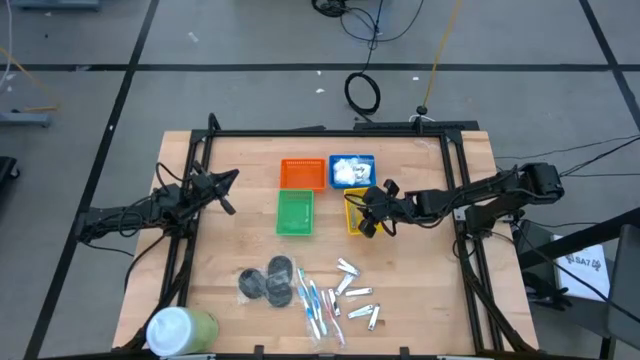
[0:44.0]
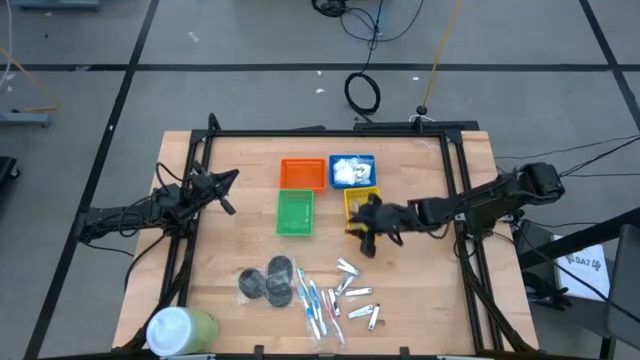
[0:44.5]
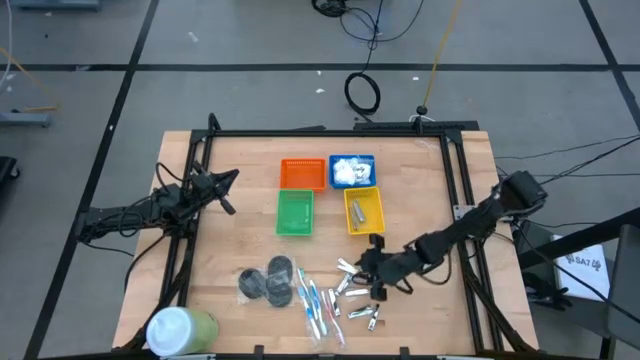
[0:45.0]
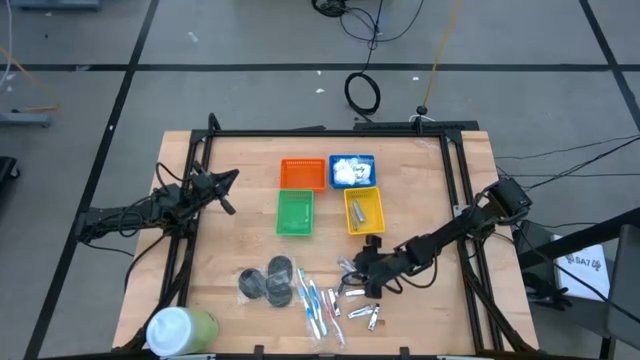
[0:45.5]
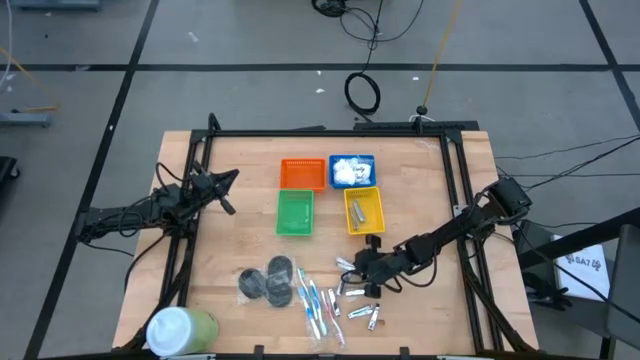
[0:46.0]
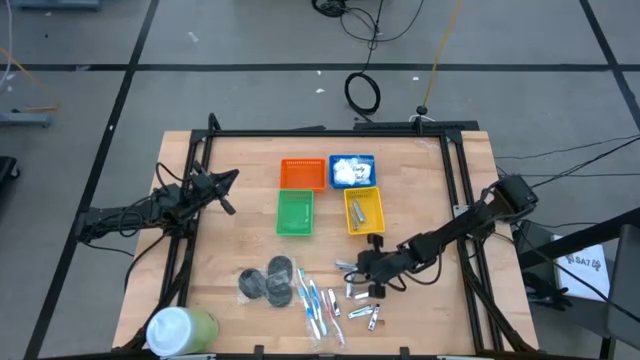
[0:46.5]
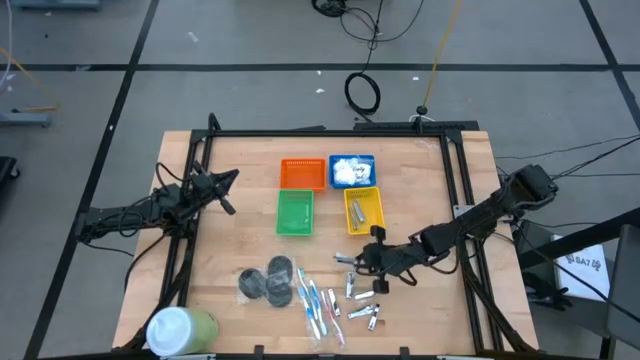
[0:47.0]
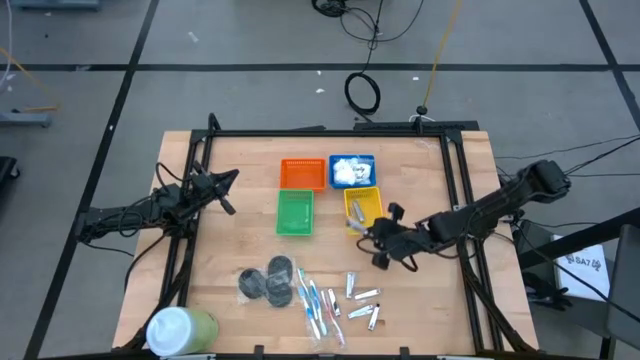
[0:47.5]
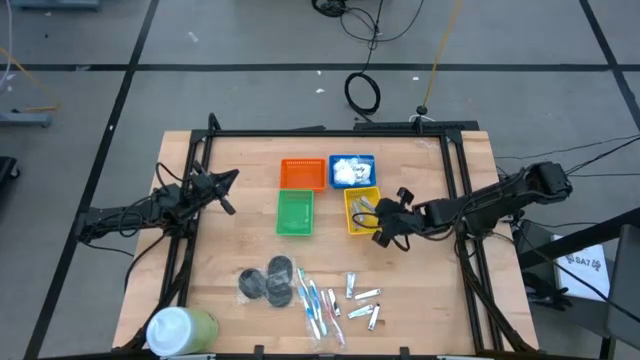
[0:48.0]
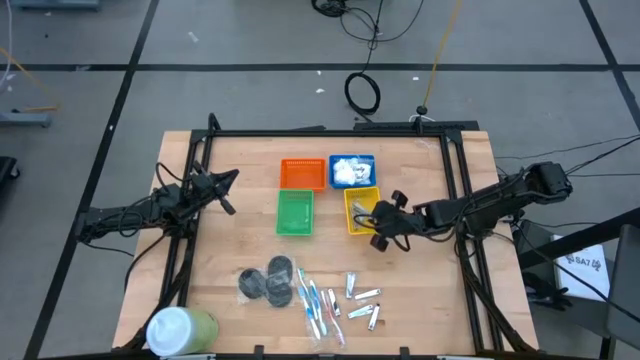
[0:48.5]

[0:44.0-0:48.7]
Task: Pick & Place Travel size toiletries
Put the silver nail cutter into the yellow bin

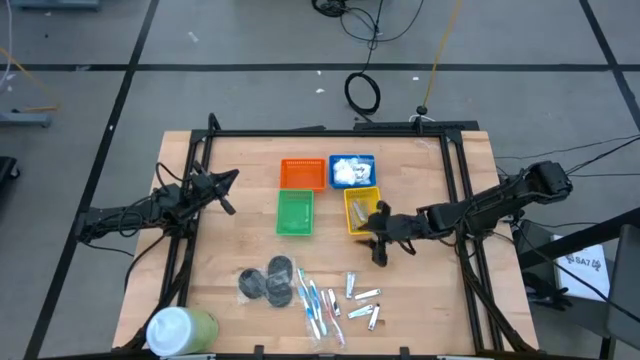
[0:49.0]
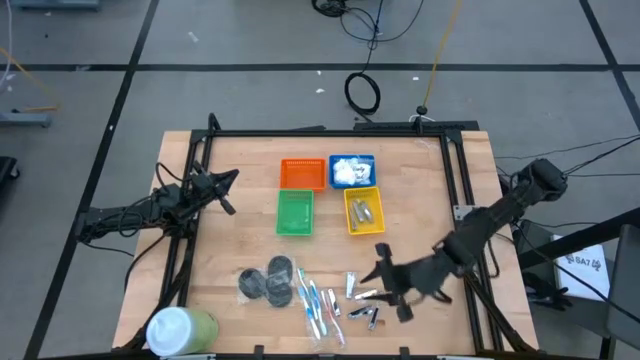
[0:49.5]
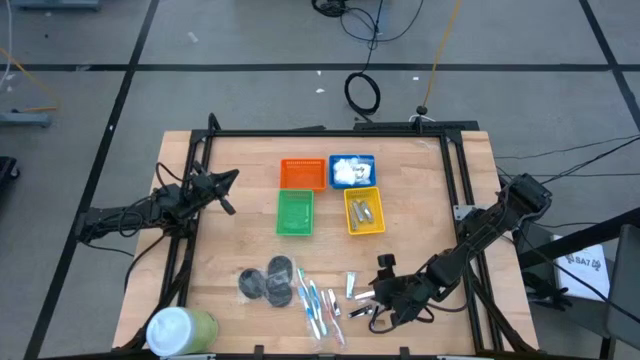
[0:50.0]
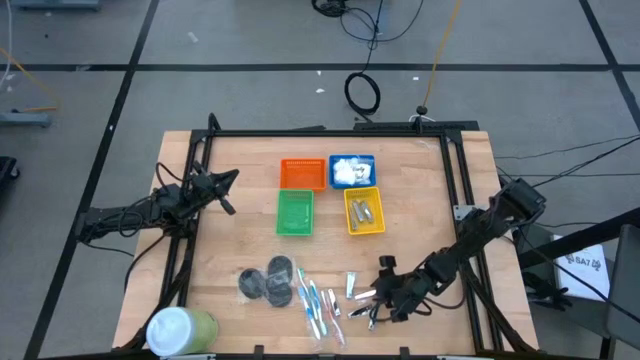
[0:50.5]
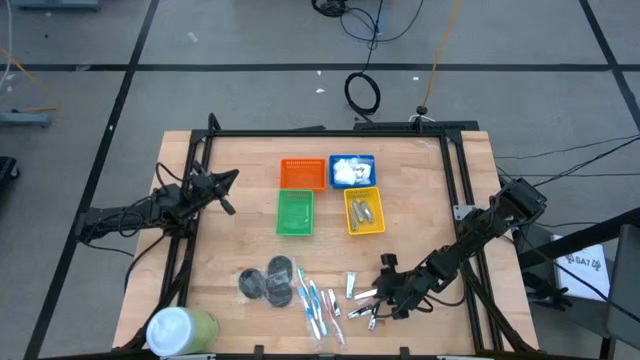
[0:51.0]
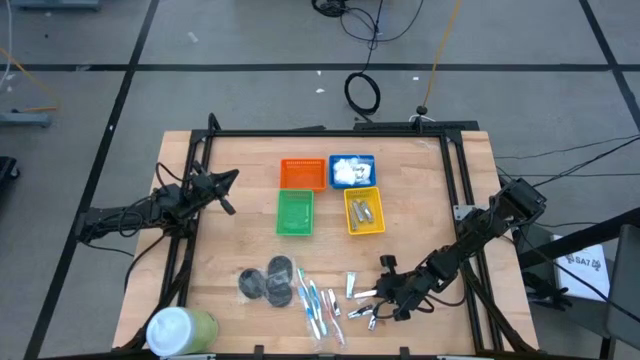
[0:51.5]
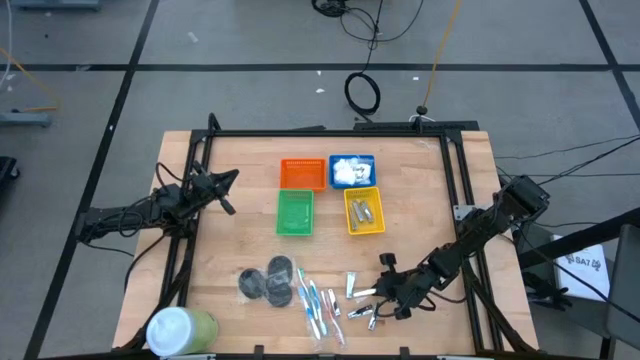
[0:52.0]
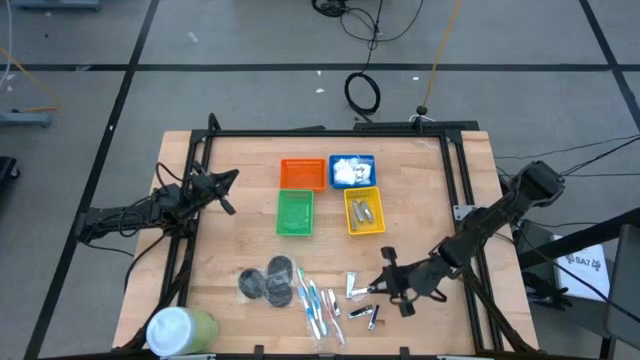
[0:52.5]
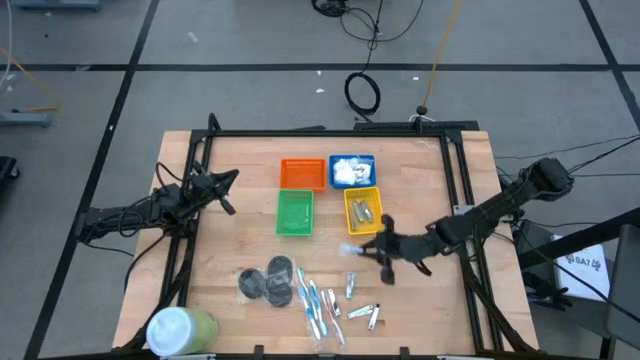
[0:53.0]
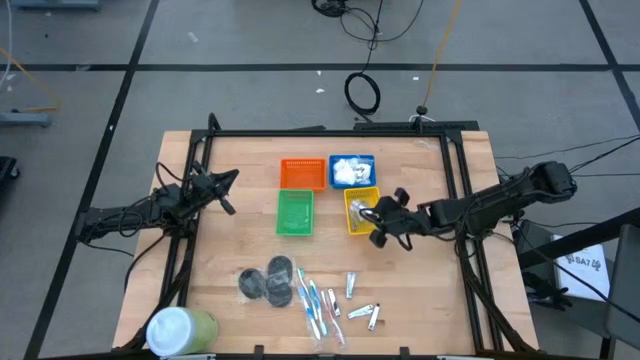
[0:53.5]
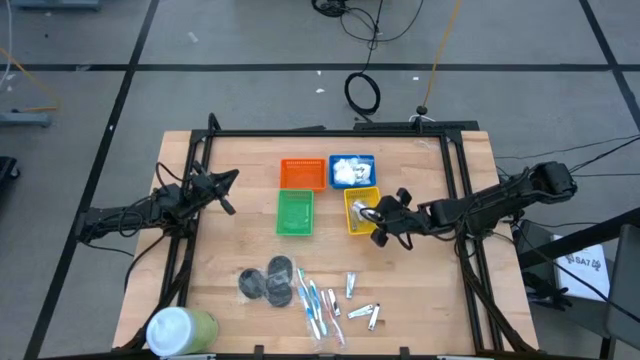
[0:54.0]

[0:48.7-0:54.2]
Put the silver nail cutter into the yellow bin

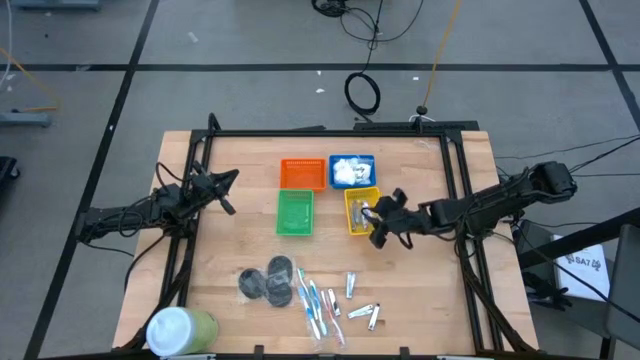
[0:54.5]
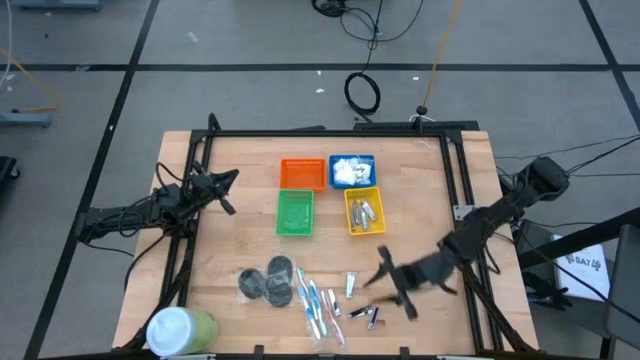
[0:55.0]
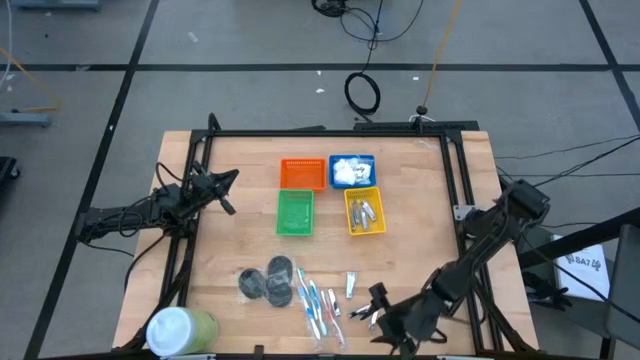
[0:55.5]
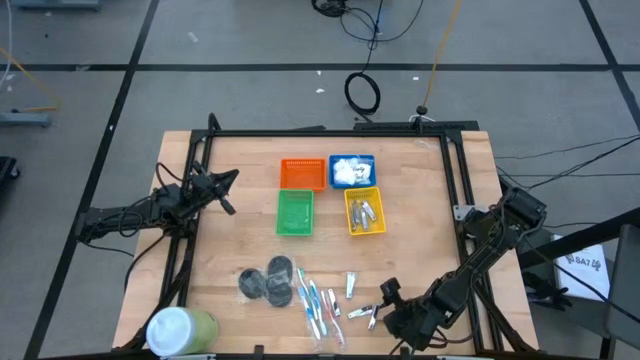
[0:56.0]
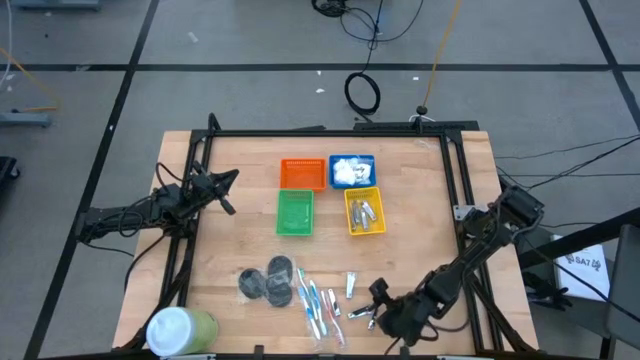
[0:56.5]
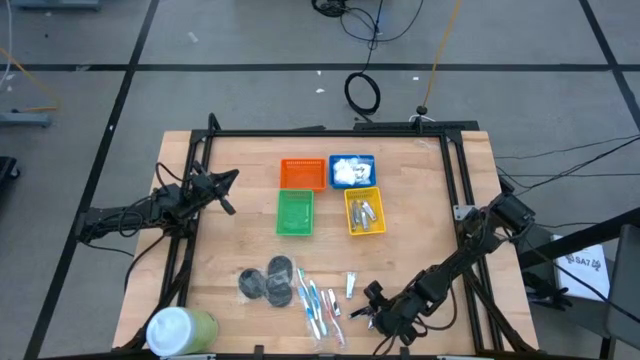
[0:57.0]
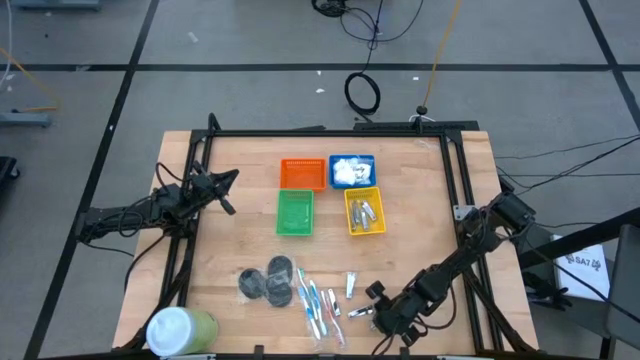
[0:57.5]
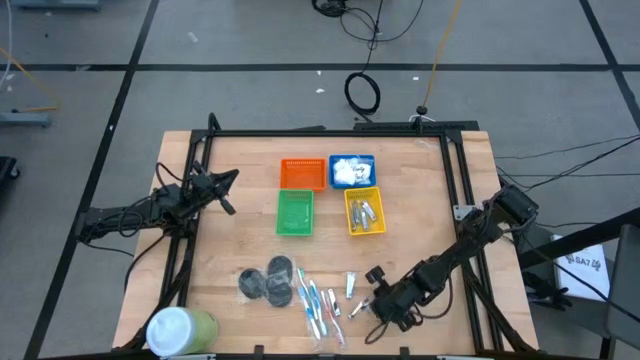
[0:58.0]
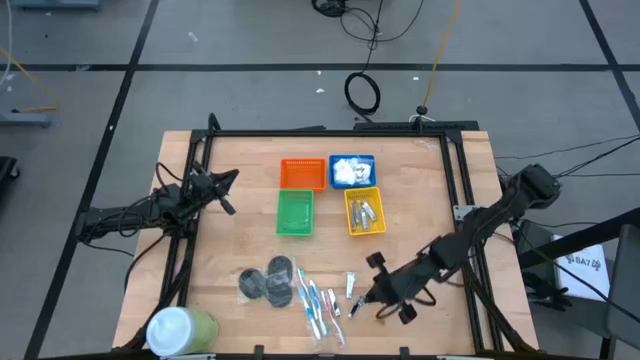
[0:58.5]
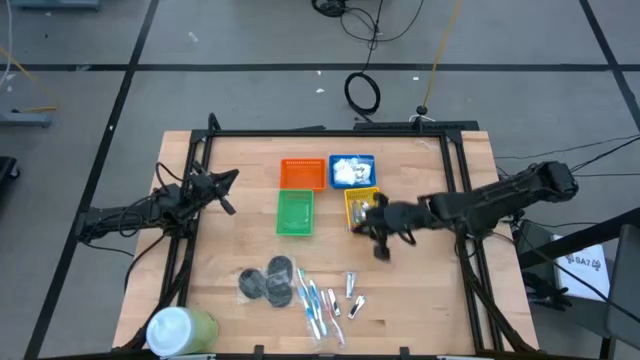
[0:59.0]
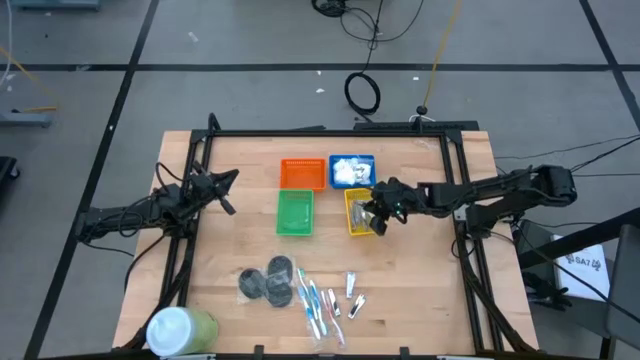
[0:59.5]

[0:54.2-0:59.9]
Put the silver nail cutter into the yellow bin

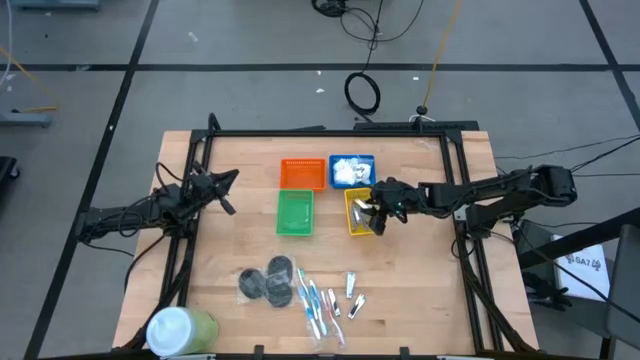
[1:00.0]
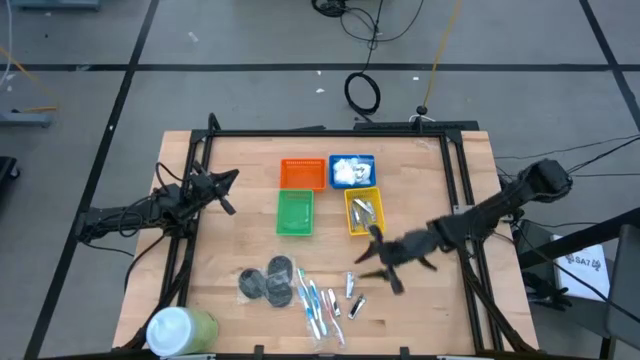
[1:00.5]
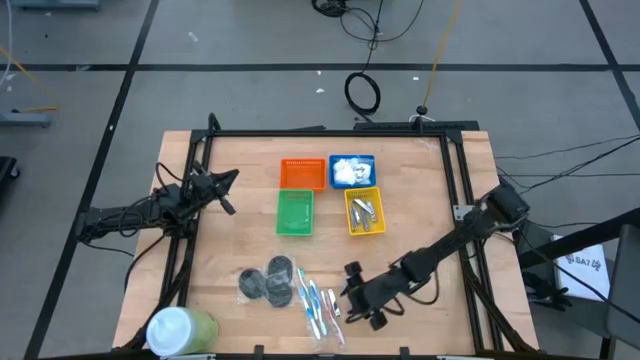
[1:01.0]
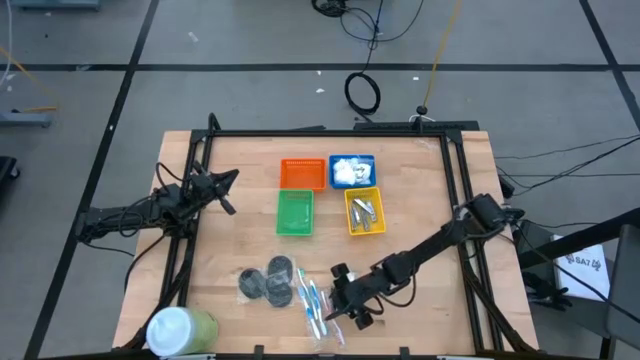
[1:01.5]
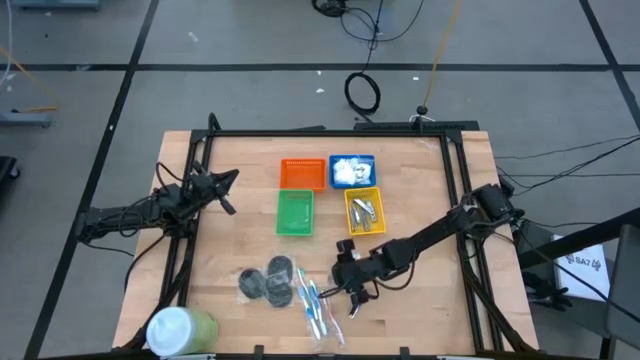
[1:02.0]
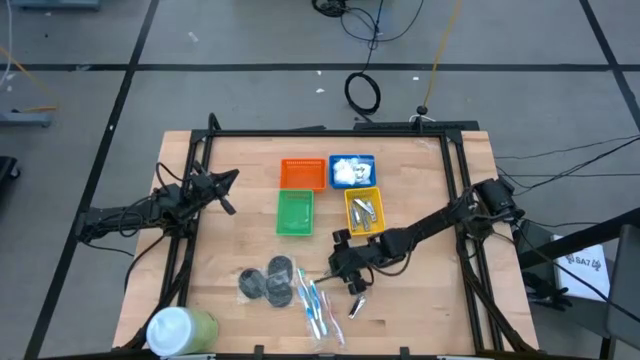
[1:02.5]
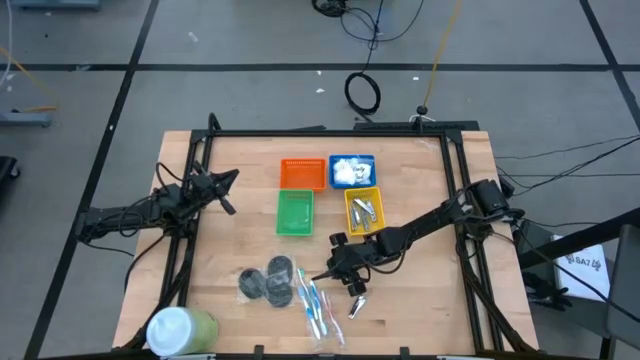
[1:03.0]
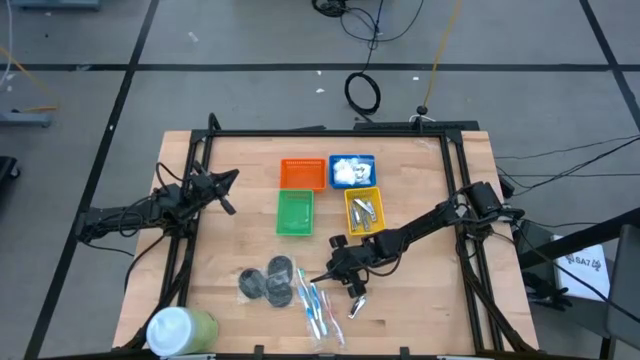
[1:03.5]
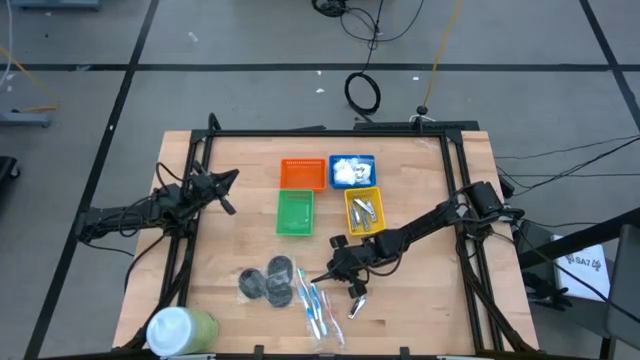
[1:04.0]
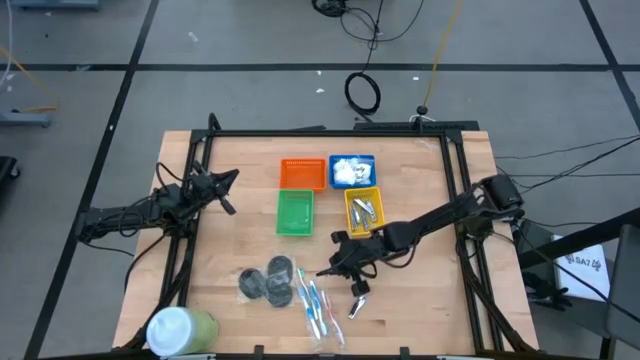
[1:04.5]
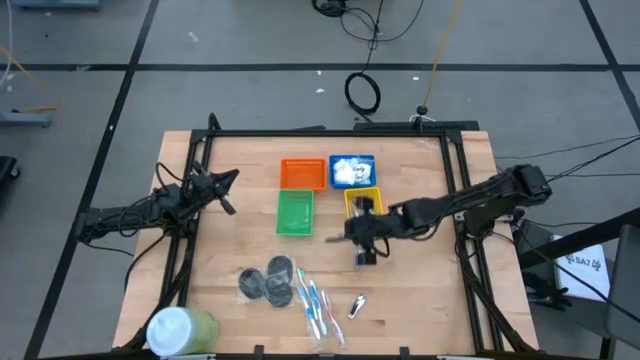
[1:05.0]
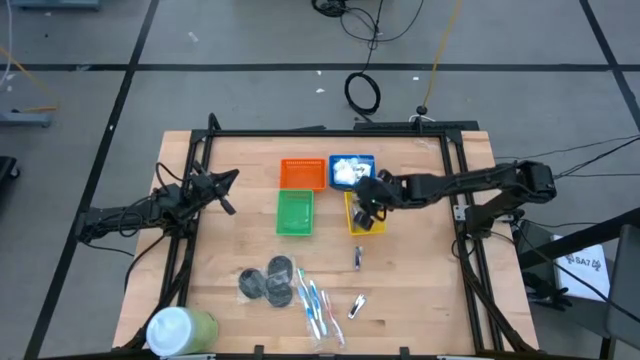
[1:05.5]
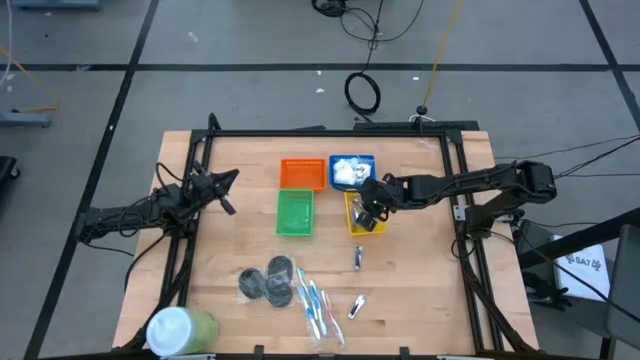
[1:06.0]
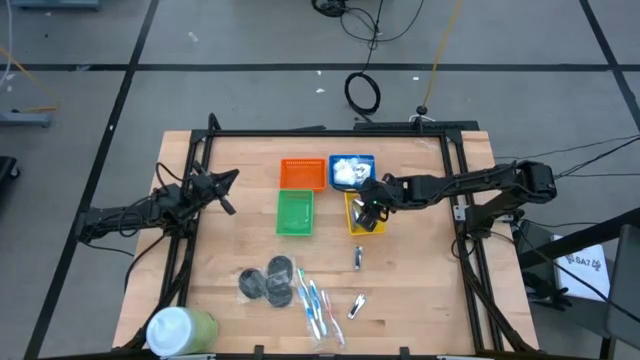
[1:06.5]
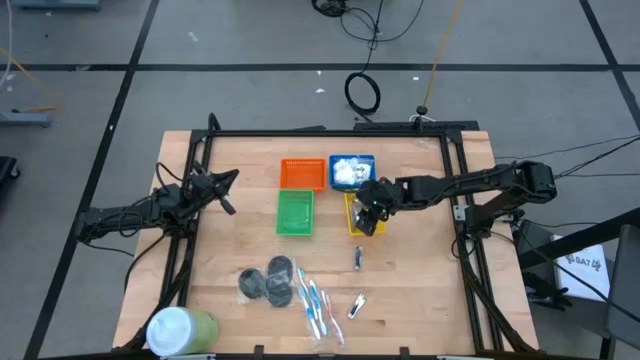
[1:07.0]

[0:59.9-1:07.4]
Put the silver nail cutter into the yellow bin
